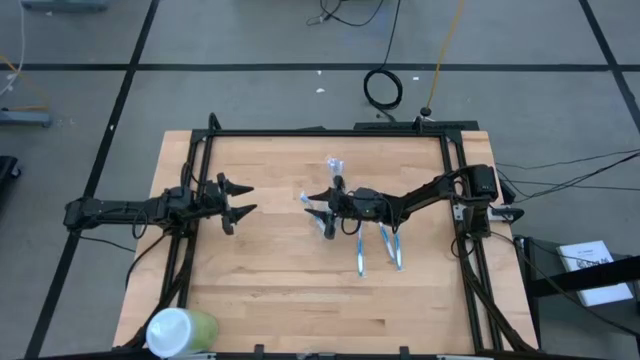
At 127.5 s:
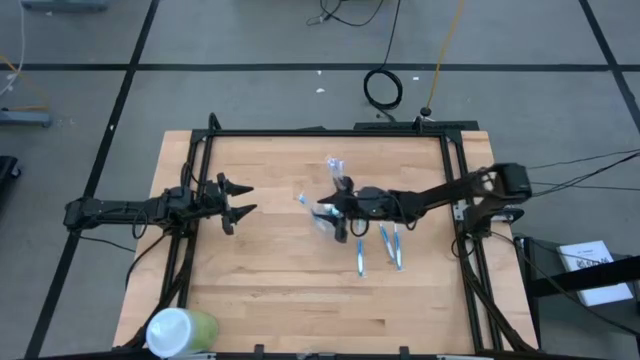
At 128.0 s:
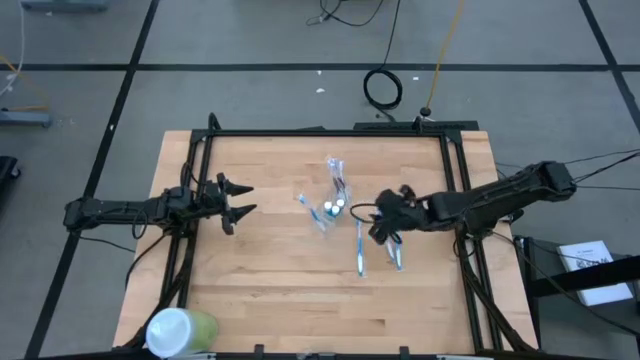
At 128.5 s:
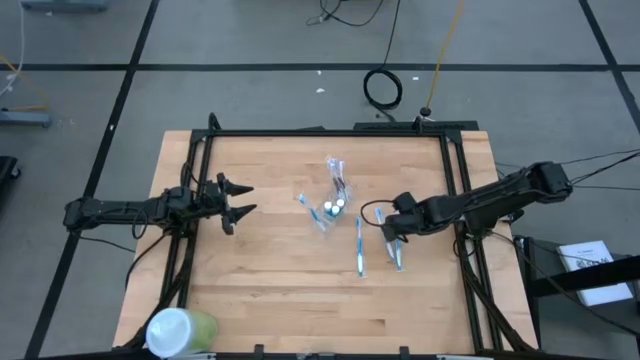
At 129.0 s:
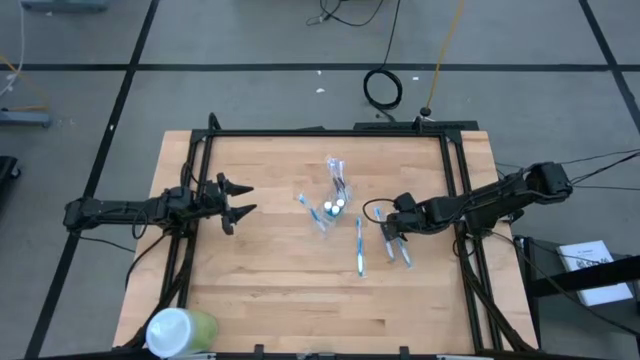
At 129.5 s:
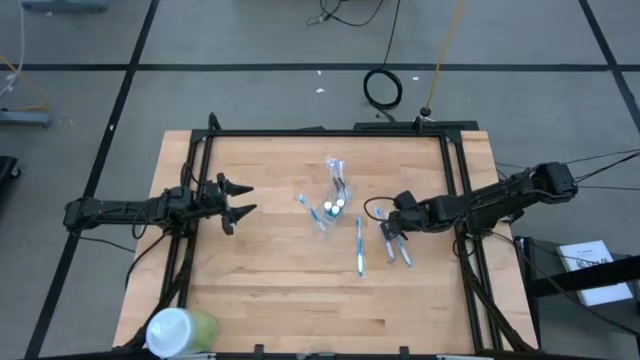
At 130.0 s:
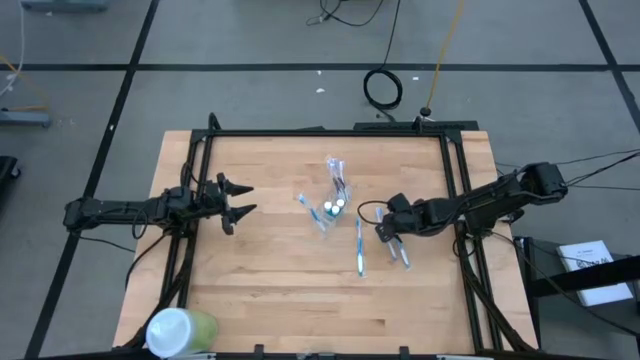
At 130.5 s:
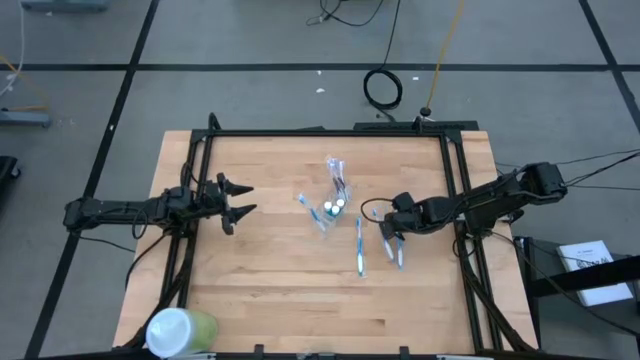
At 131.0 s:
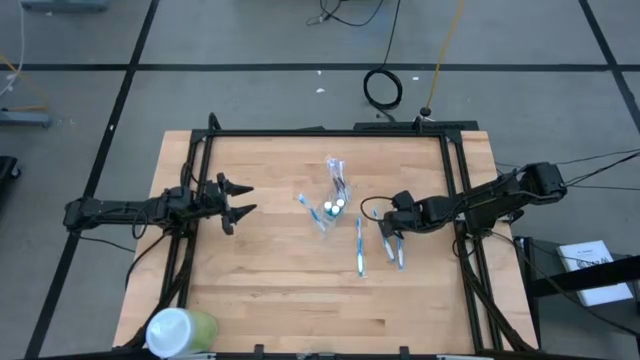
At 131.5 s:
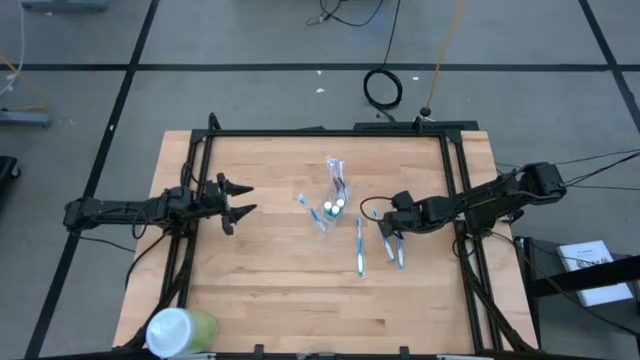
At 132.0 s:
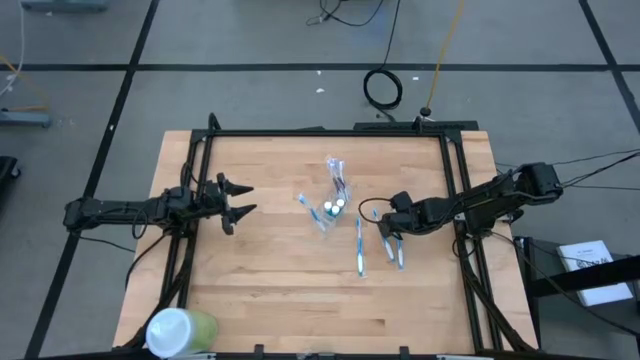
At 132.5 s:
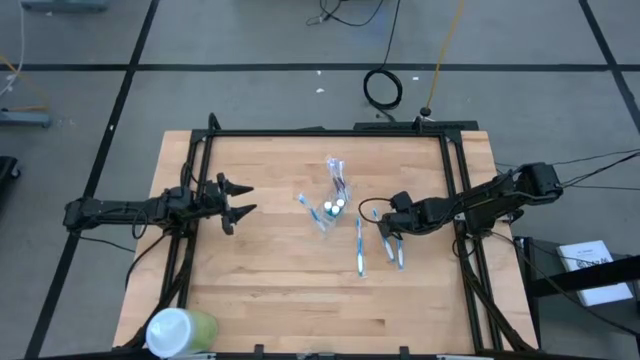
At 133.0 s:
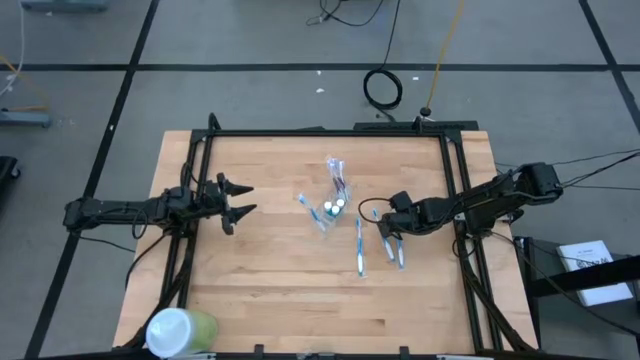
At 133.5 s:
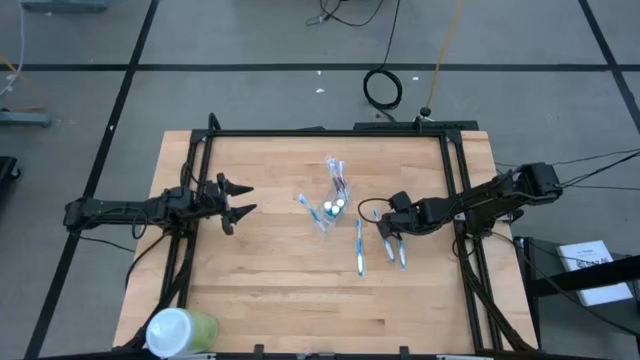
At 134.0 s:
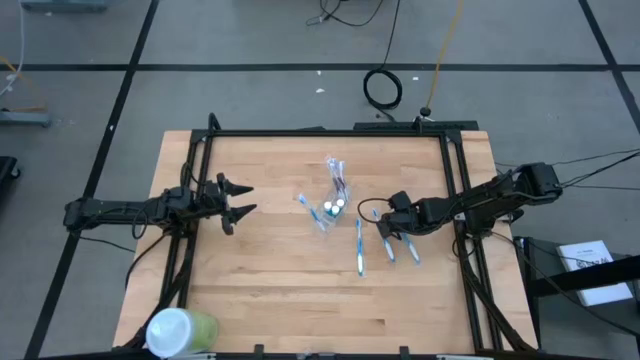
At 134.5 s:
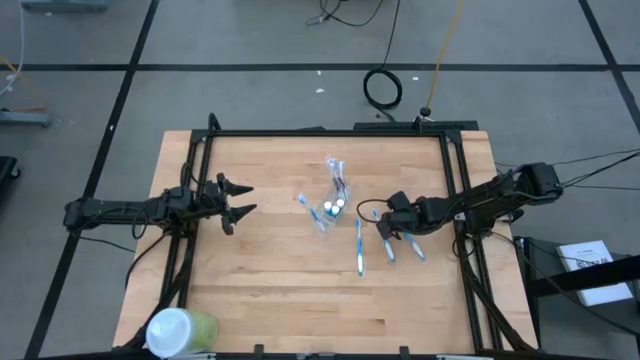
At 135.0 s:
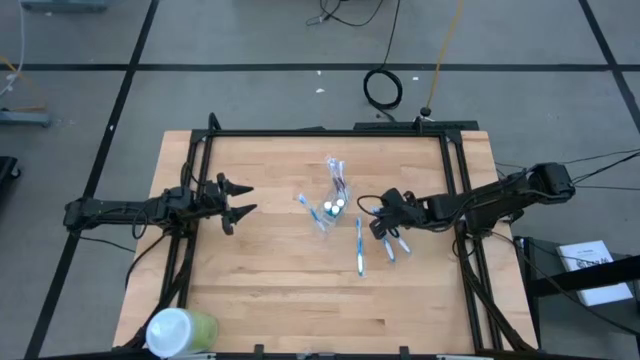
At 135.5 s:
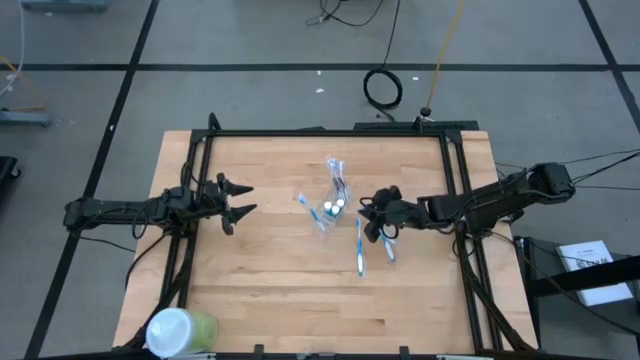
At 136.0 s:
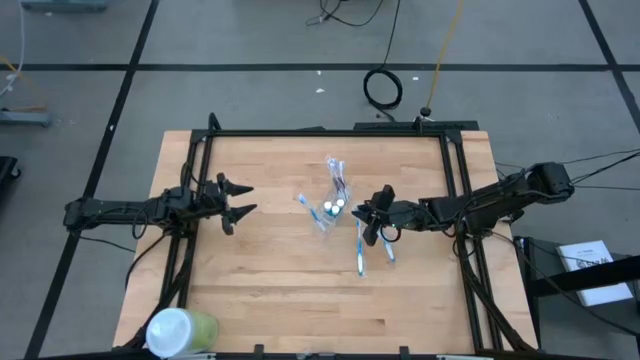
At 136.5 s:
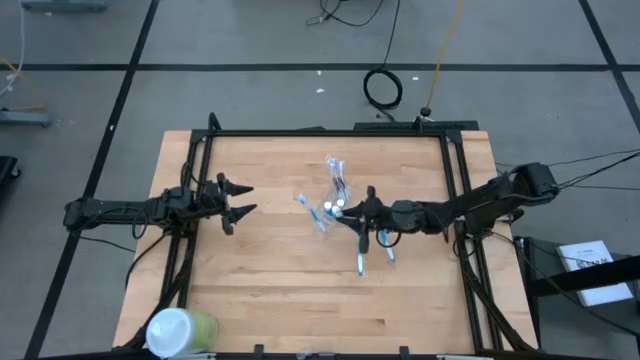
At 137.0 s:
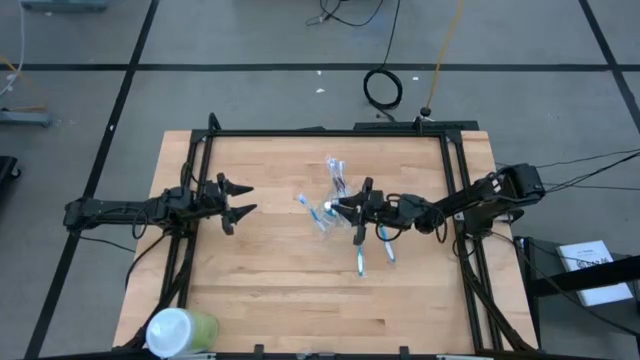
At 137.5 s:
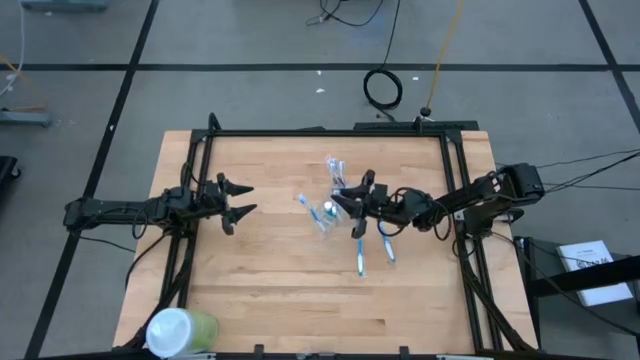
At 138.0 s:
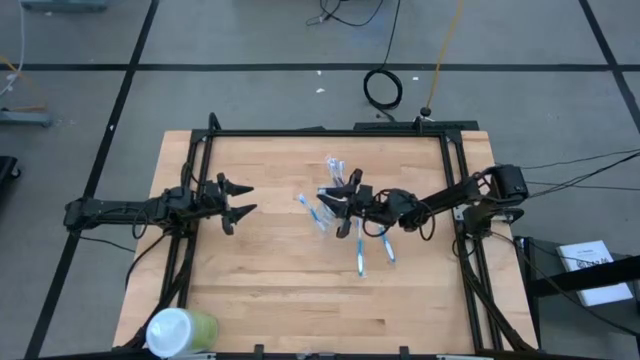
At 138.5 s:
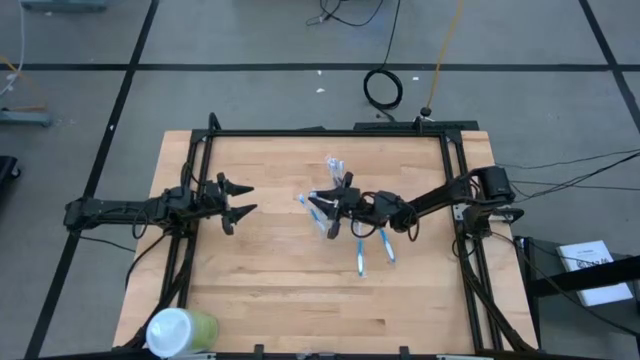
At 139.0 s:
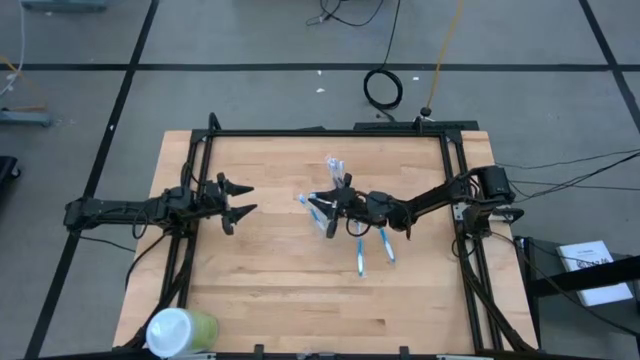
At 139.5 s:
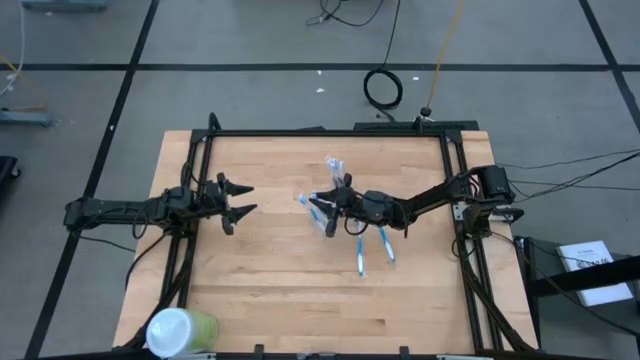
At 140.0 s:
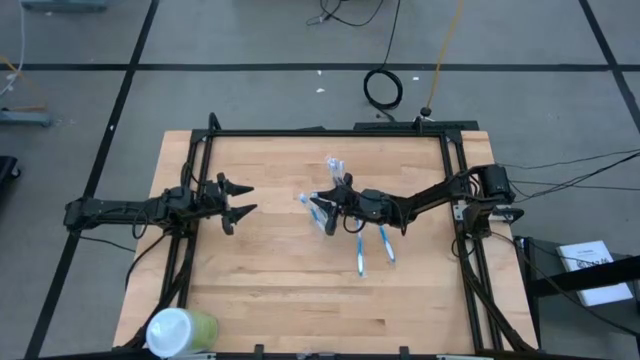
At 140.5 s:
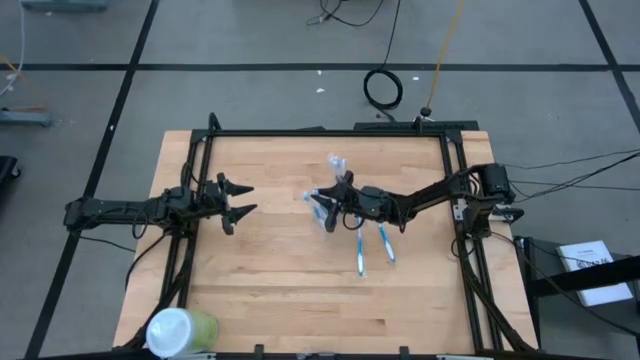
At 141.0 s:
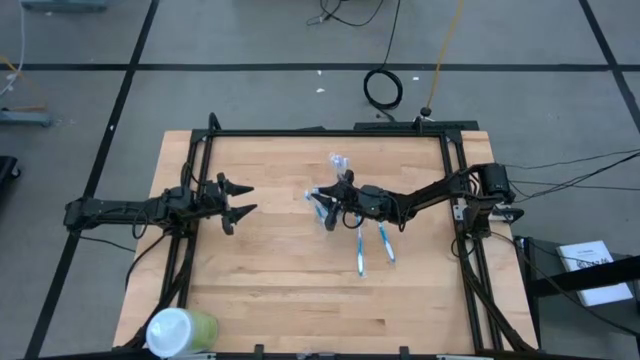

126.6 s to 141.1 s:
Task: Pick & Place toothbrushing station
Put the blue toothbrush into the transparent organizer

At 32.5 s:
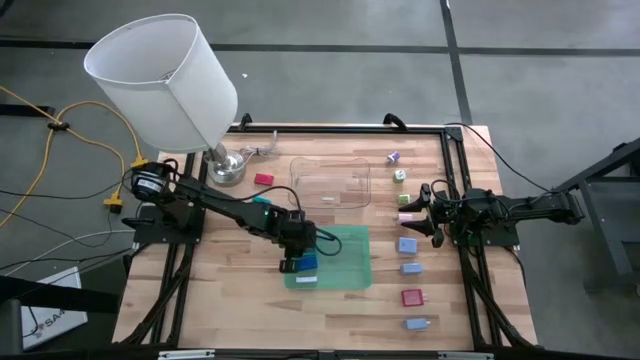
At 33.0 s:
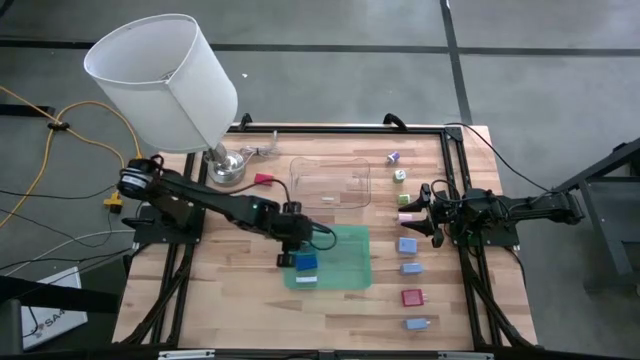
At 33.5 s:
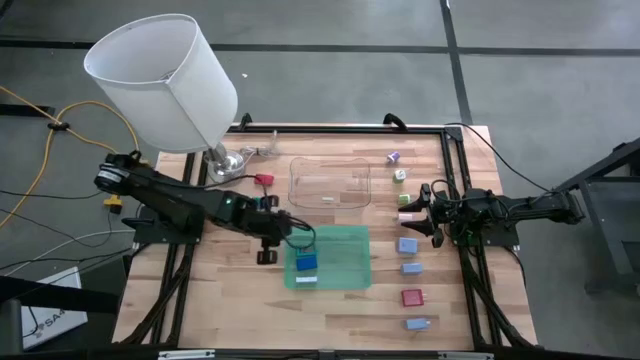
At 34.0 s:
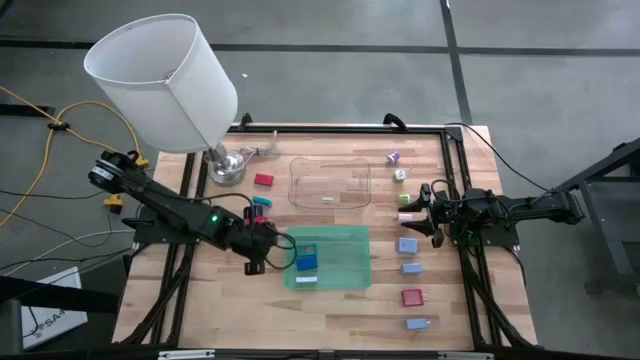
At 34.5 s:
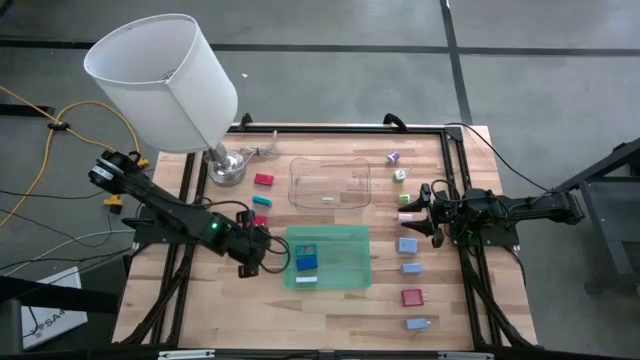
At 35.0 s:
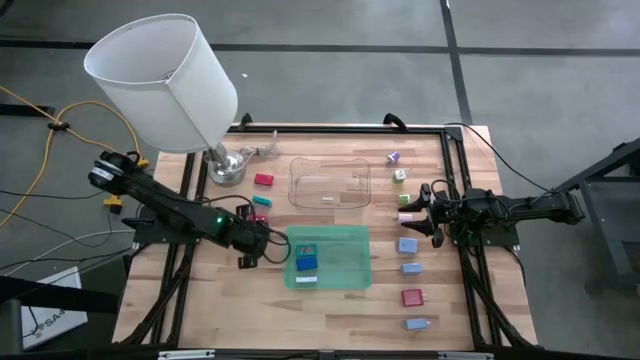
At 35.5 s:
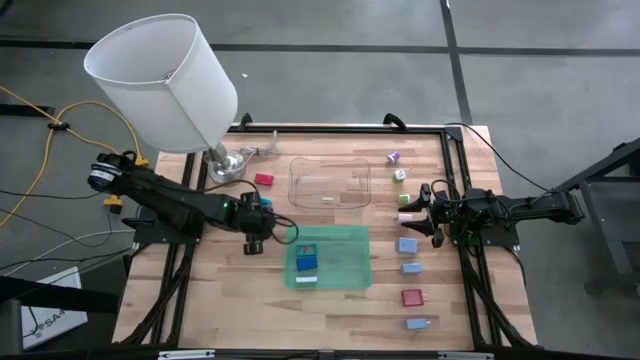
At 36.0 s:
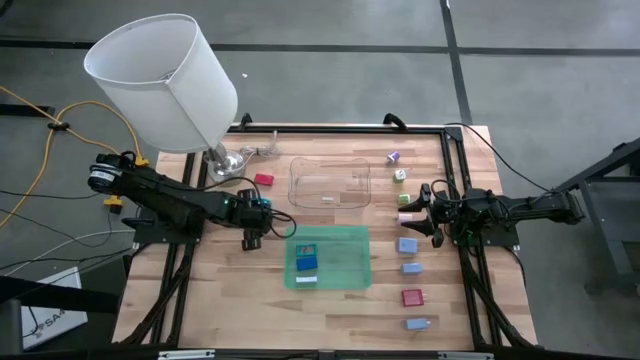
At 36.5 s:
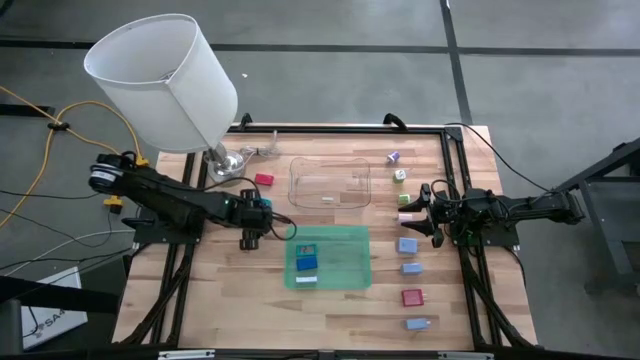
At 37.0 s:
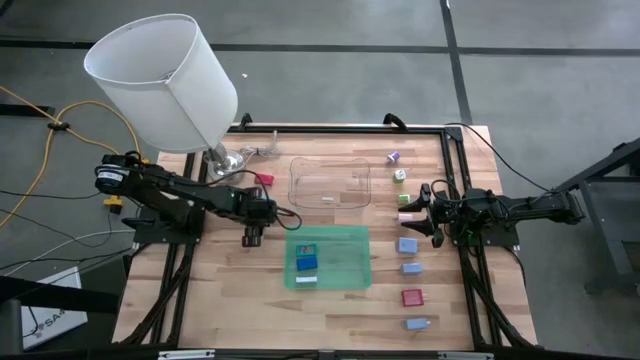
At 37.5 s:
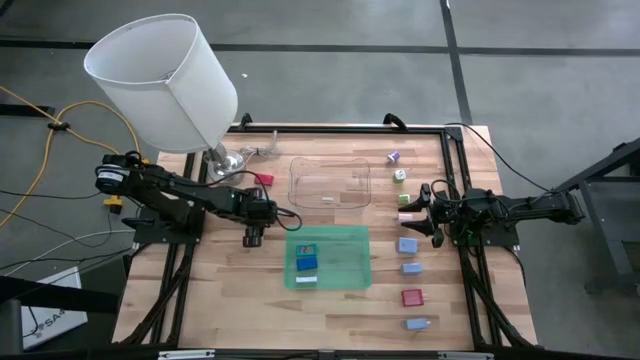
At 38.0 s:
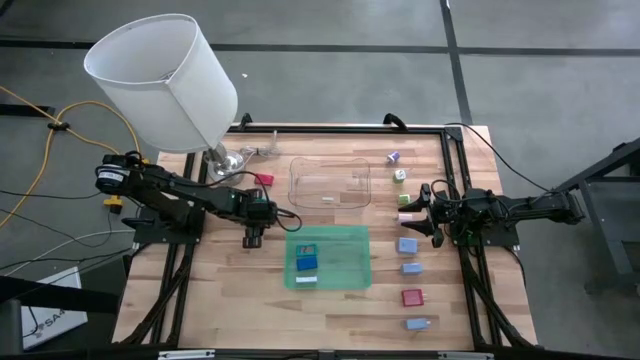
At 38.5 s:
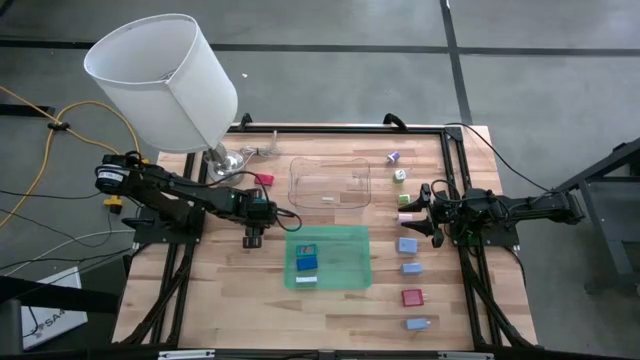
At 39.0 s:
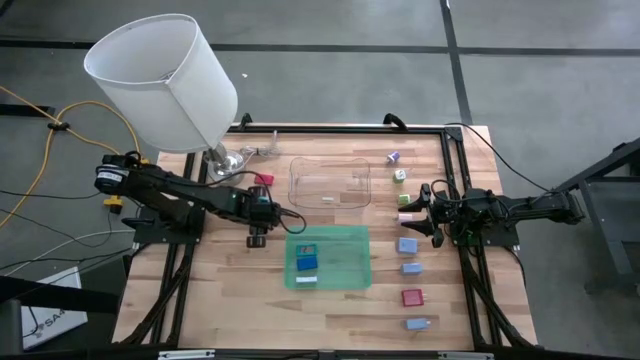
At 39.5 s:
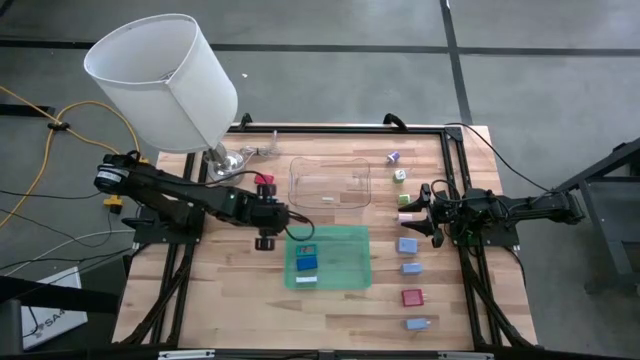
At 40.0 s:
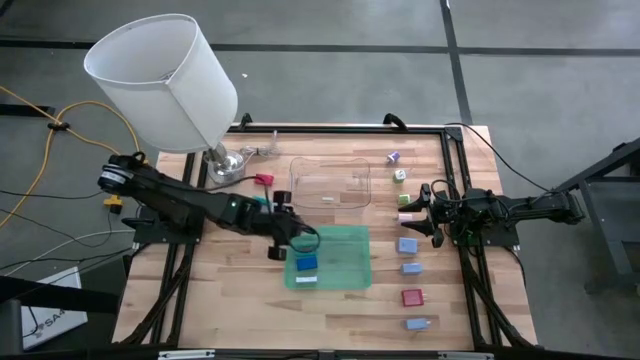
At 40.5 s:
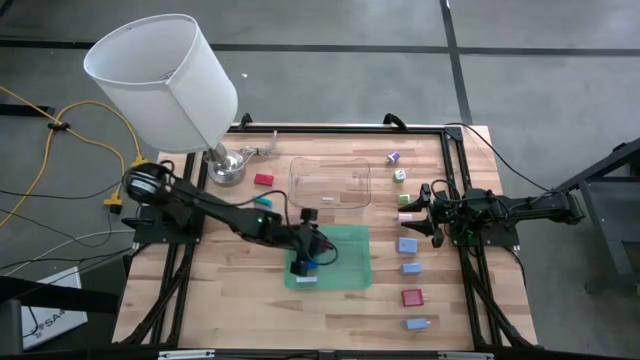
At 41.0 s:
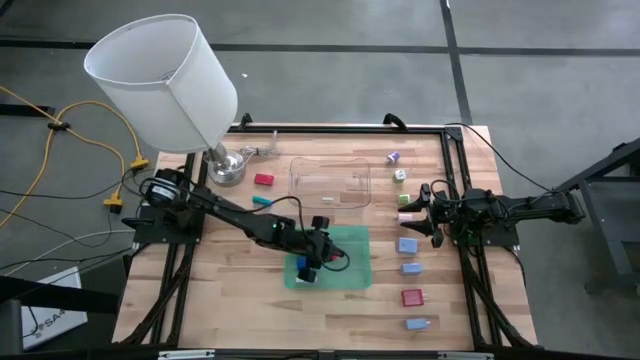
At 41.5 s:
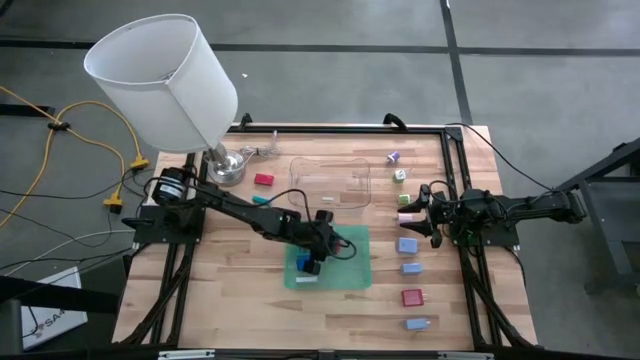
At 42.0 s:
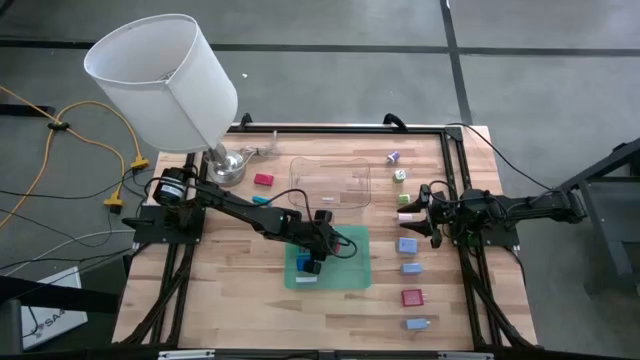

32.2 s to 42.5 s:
Task: Pick & Place Office items
Put the bottom red digital clock into the blue bin
